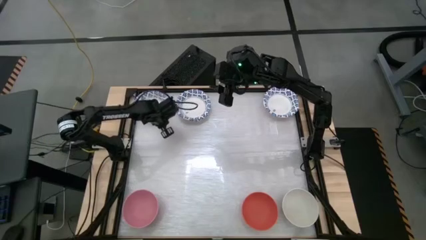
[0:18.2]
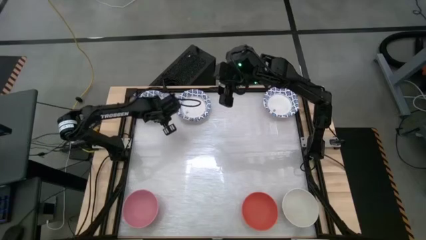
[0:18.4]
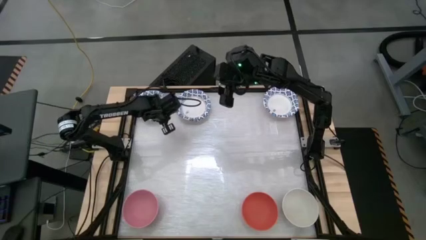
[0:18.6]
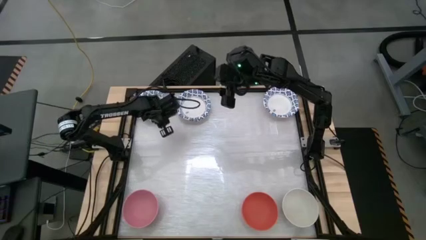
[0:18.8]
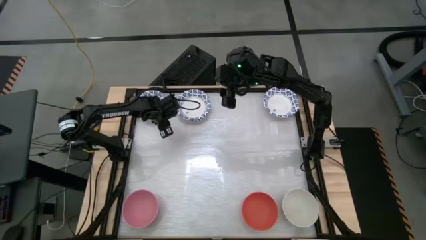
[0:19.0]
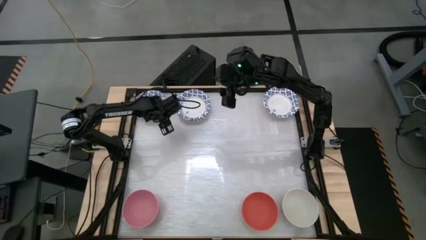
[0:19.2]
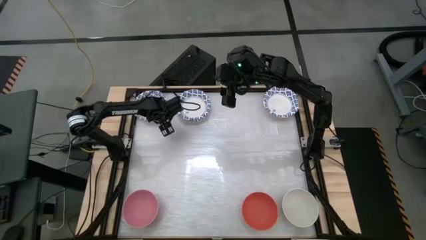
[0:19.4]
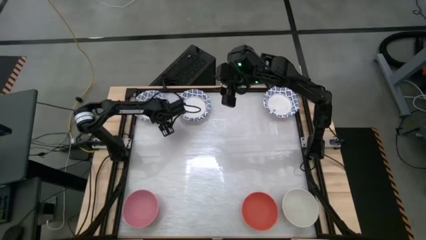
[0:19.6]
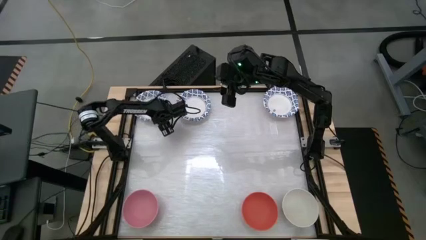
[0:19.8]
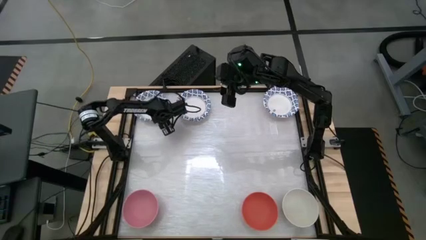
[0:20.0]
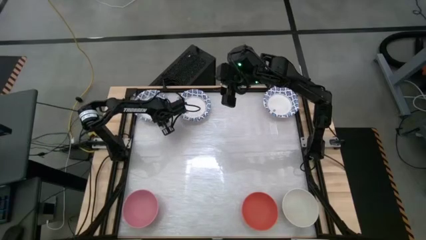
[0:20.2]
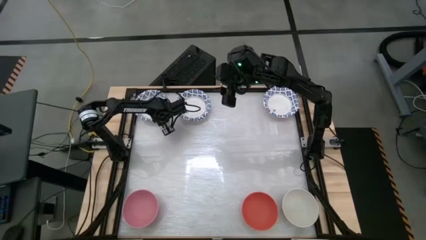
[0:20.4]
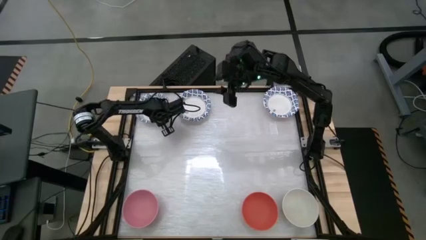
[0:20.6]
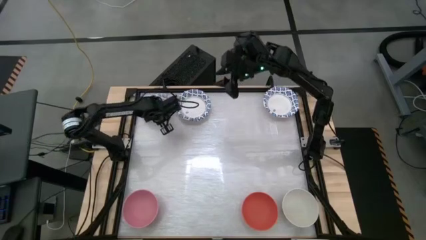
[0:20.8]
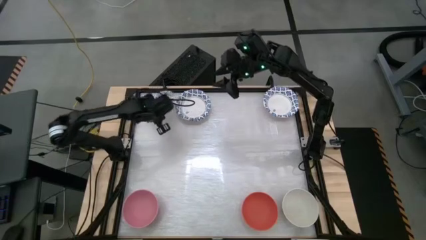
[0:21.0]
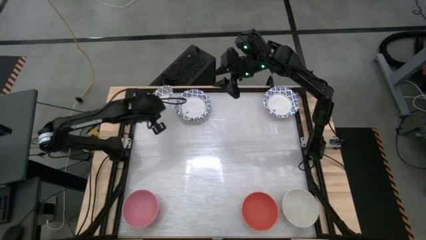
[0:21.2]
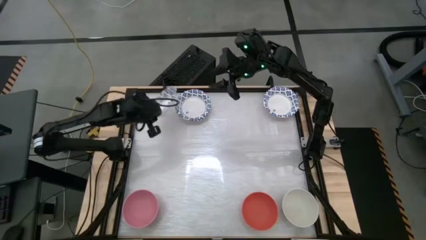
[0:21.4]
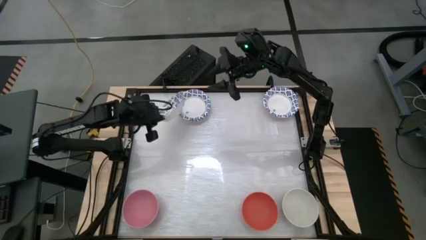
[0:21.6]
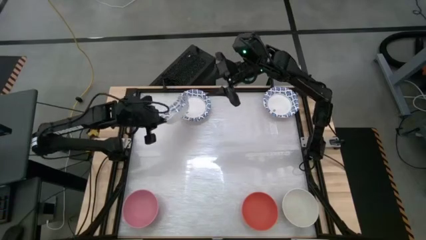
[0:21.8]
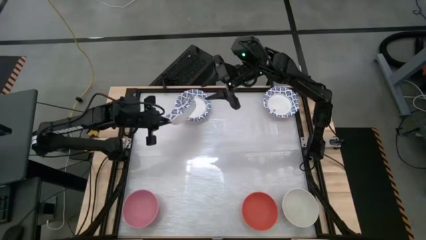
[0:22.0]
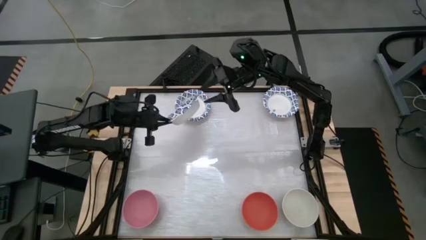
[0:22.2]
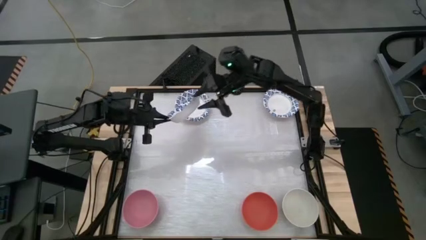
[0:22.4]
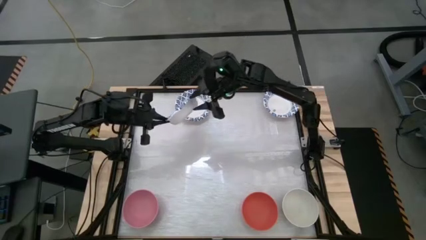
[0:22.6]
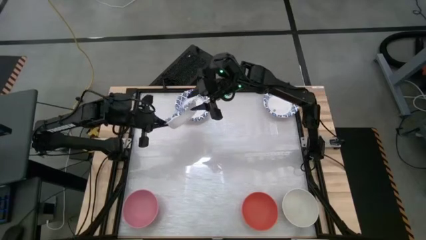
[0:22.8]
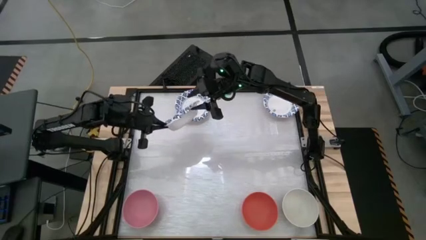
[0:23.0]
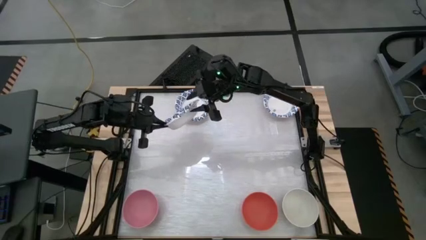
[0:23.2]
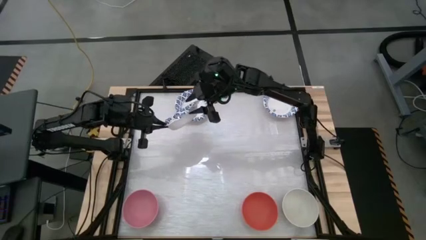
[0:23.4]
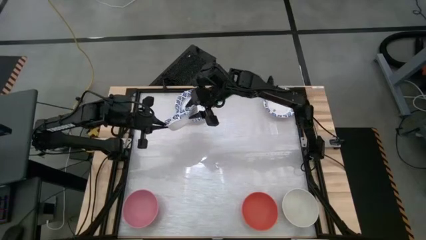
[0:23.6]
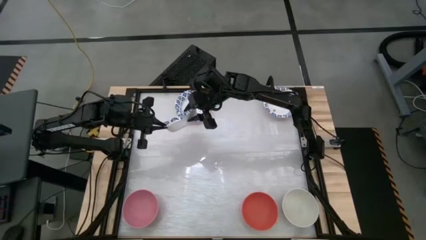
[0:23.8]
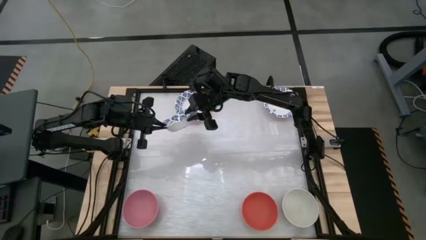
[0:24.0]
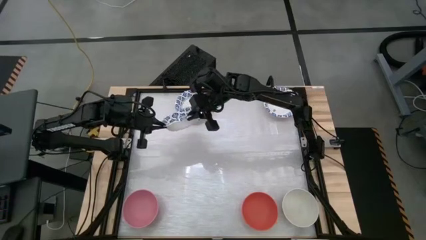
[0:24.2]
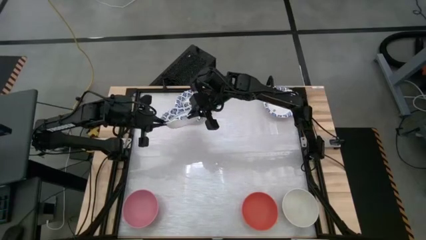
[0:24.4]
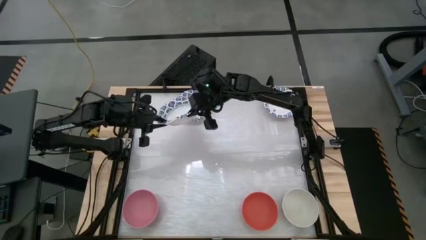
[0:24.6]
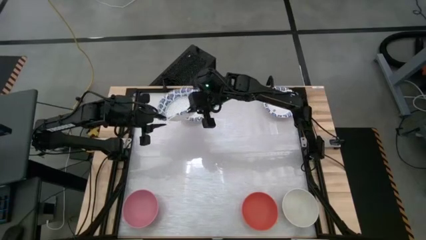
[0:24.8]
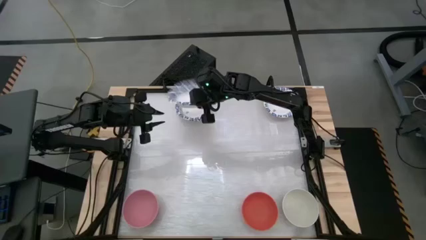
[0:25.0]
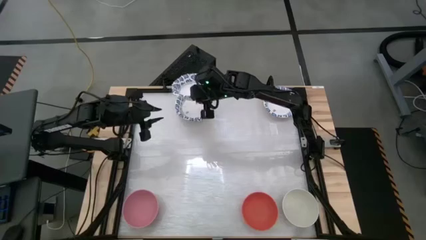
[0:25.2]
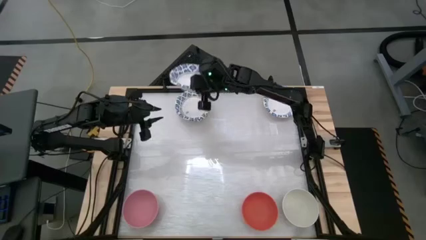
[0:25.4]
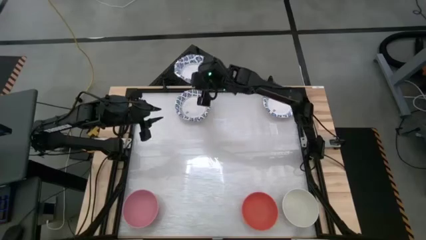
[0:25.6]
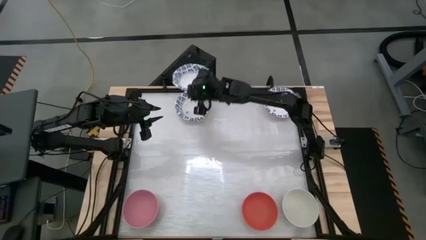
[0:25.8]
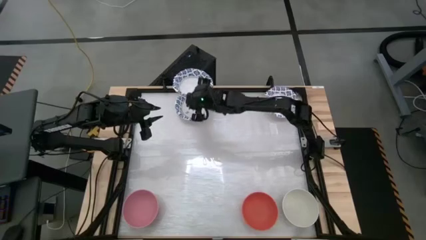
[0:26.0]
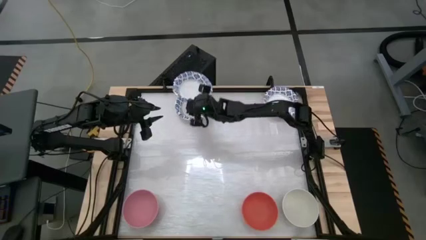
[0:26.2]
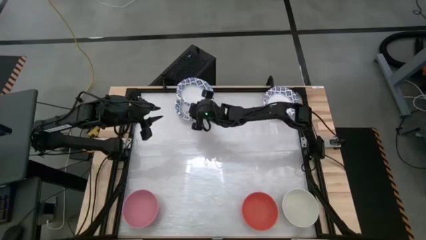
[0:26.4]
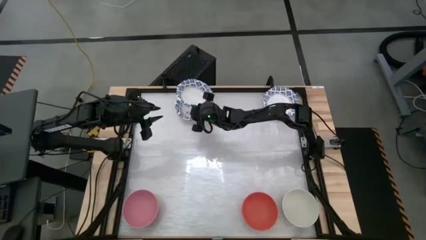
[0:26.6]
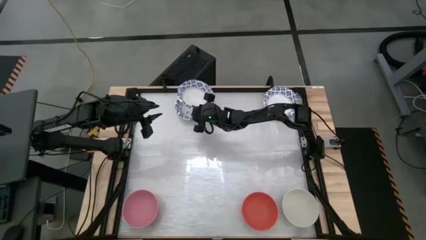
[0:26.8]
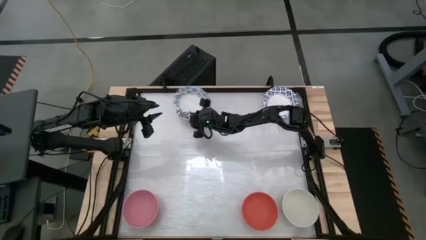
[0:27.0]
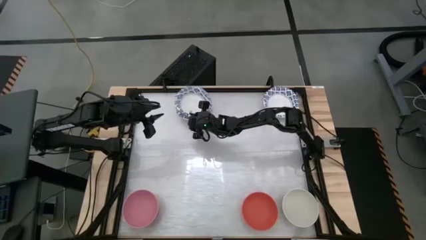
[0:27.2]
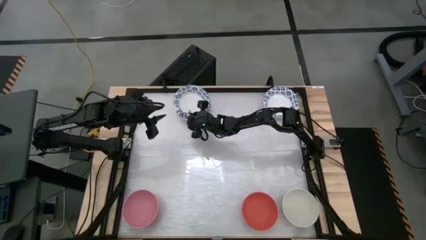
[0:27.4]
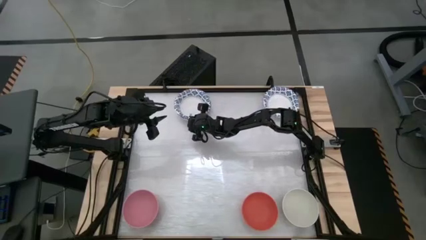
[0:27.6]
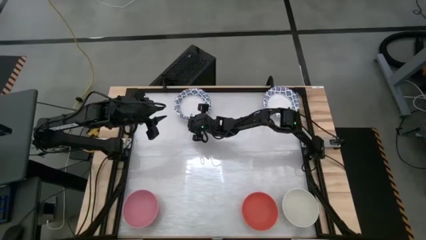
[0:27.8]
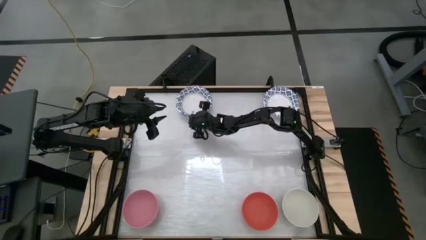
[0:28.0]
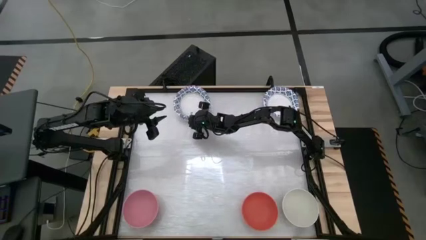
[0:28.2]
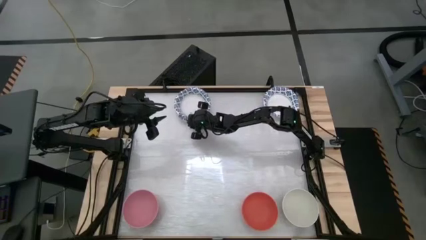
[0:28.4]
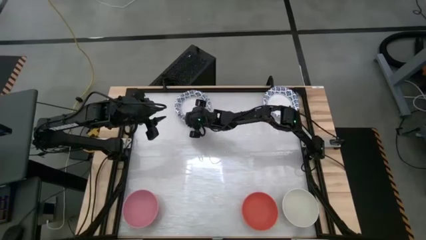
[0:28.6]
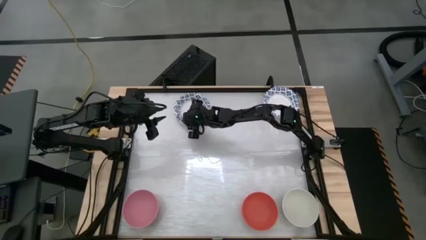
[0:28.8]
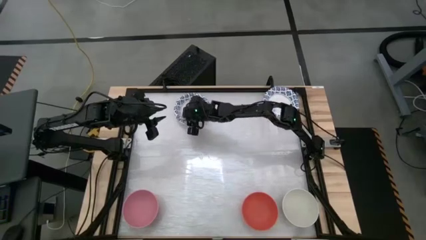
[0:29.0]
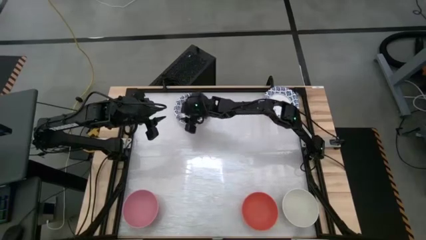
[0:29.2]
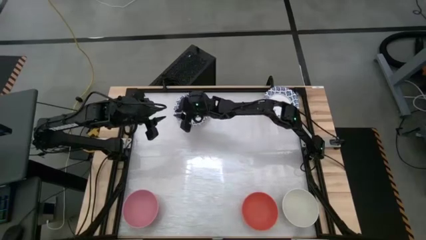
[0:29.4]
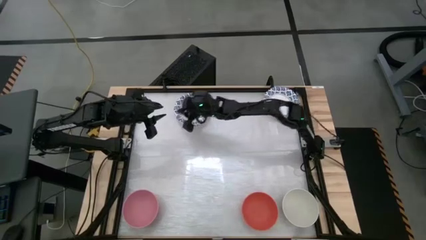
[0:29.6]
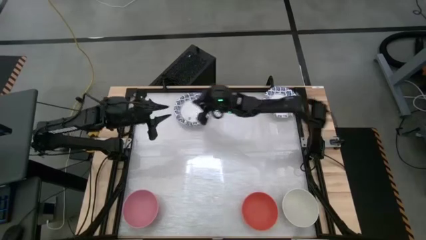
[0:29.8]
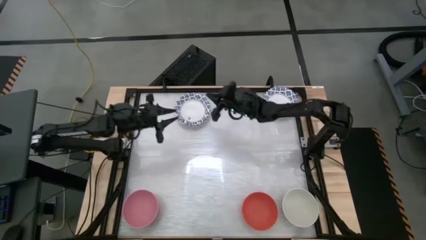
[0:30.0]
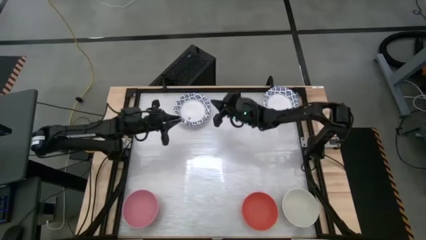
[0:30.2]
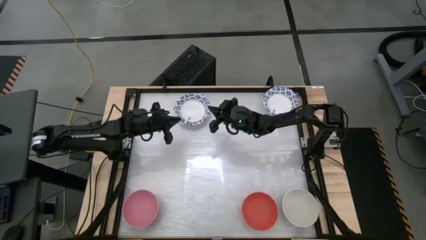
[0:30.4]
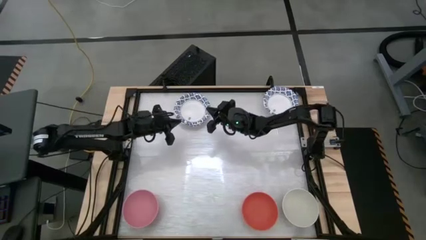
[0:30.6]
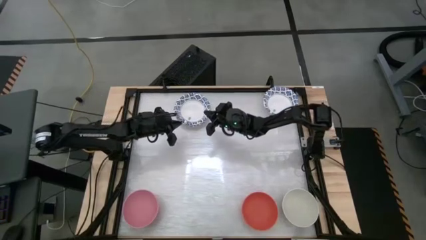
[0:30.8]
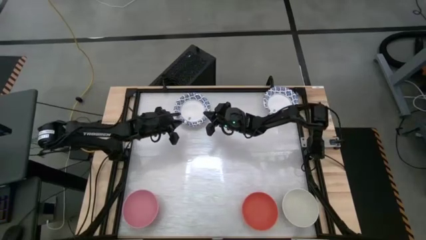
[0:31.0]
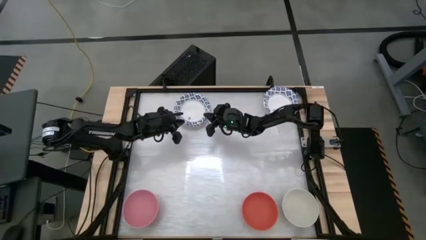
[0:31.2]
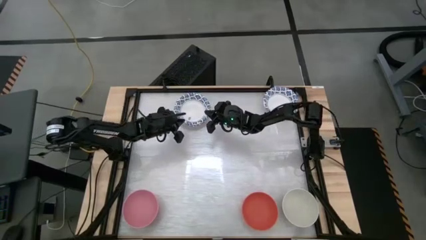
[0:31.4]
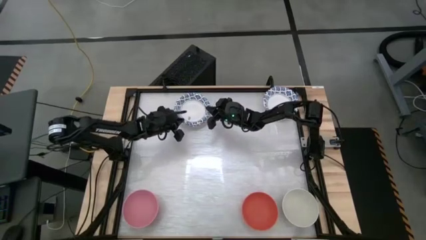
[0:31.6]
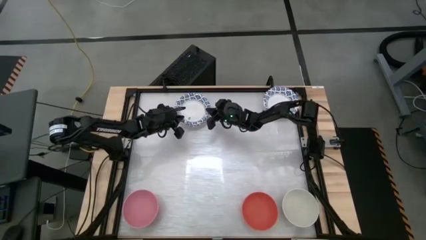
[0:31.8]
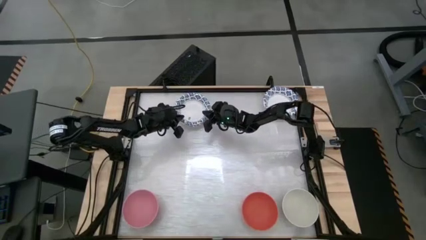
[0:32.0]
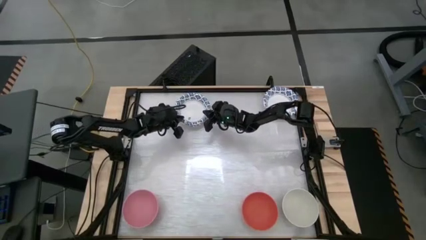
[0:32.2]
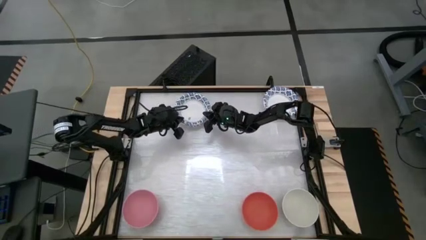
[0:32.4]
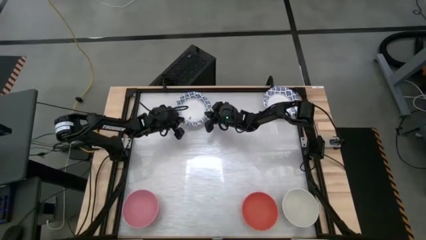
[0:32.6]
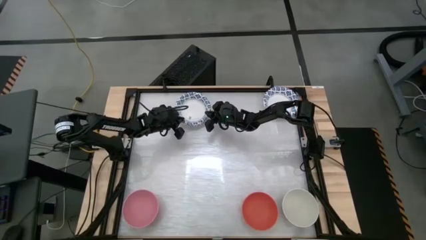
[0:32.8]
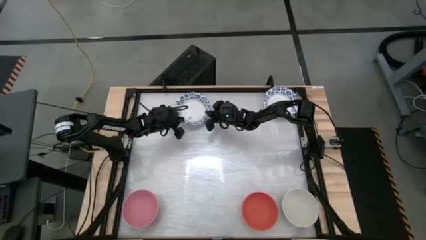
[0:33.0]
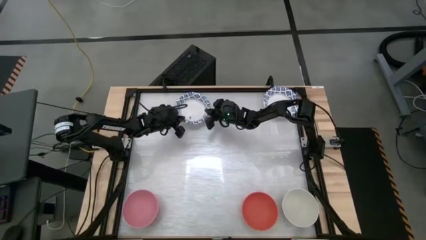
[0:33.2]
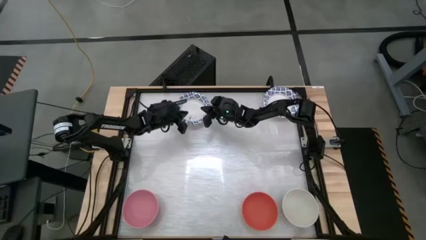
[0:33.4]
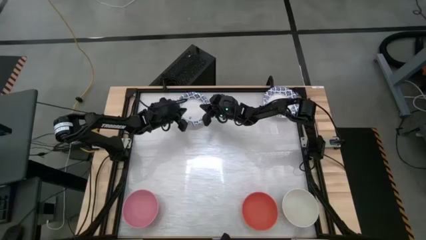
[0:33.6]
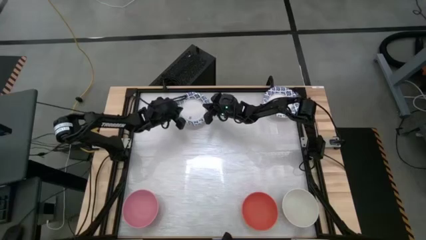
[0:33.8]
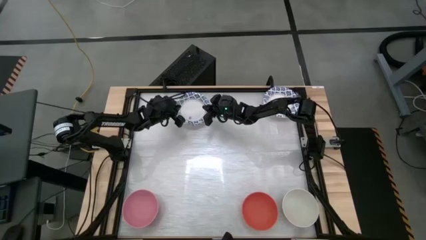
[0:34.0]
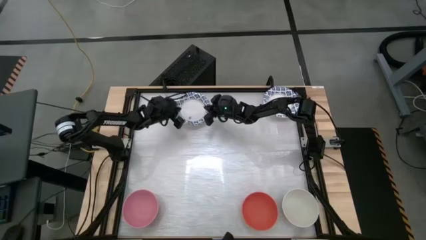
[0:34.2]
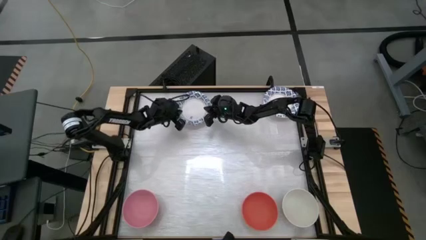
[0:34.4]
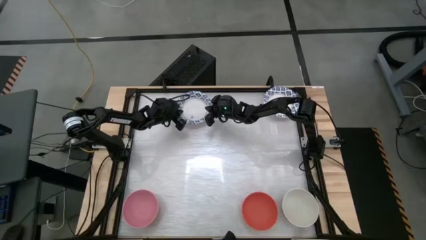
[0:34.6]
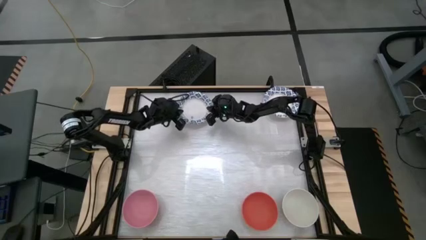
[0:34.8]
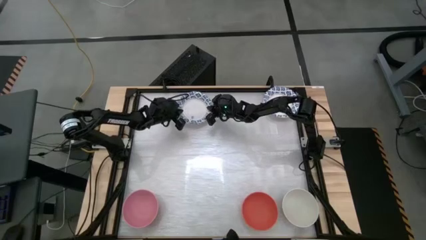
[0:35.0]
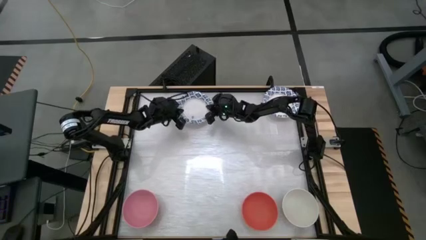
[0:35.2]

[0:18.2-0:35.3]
Stack the blue patterned bowl on top of the blue patterned bowl
